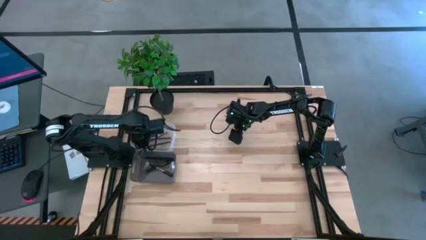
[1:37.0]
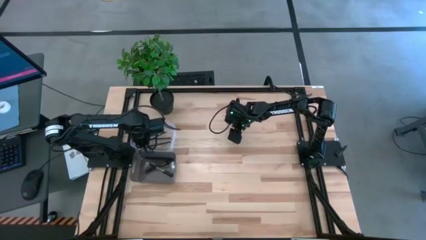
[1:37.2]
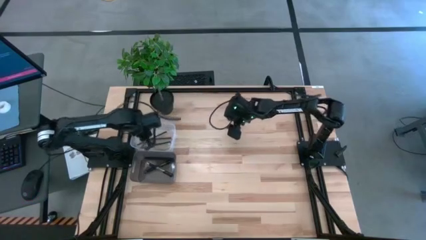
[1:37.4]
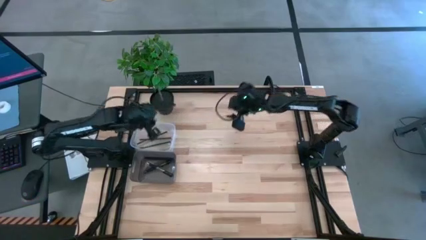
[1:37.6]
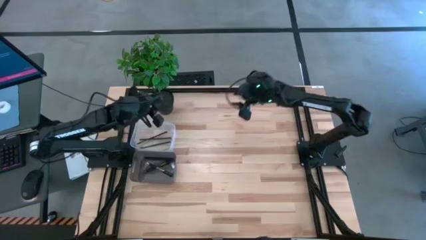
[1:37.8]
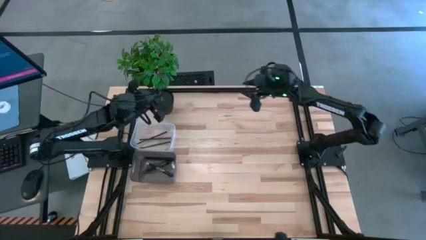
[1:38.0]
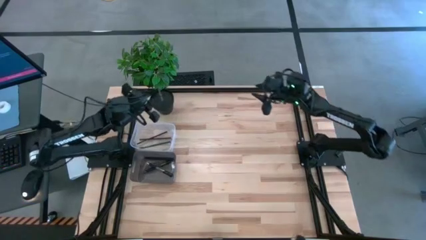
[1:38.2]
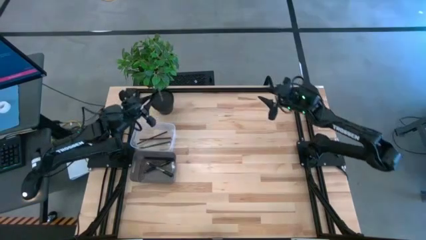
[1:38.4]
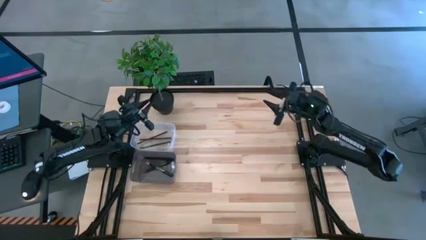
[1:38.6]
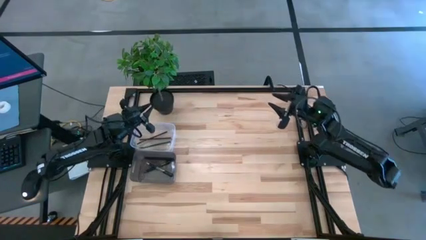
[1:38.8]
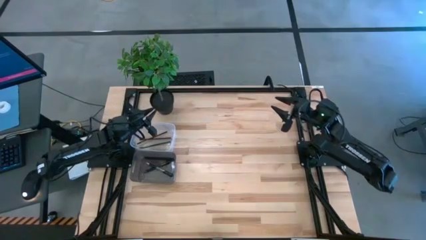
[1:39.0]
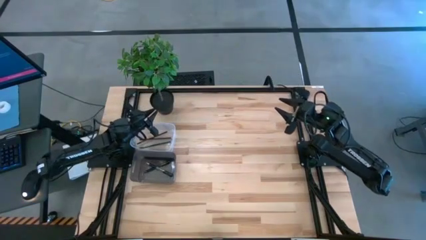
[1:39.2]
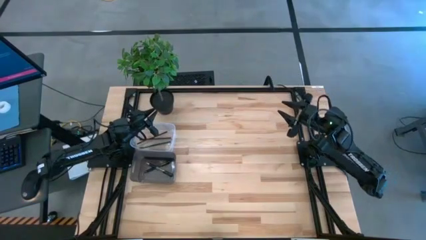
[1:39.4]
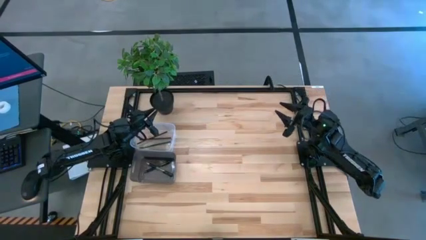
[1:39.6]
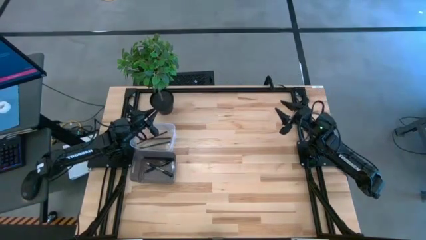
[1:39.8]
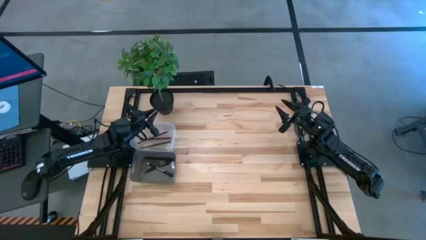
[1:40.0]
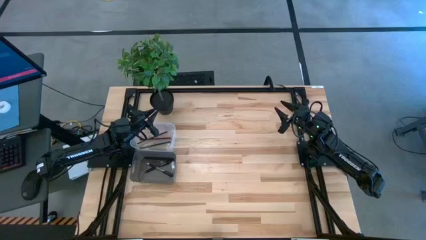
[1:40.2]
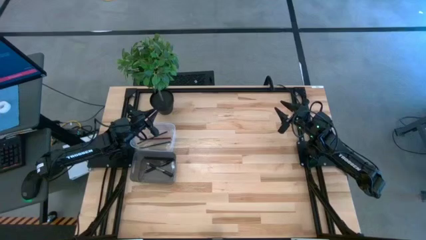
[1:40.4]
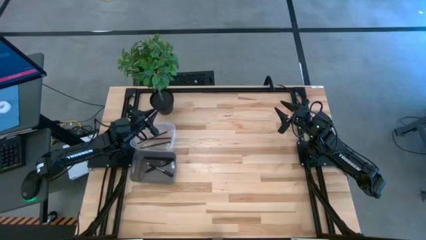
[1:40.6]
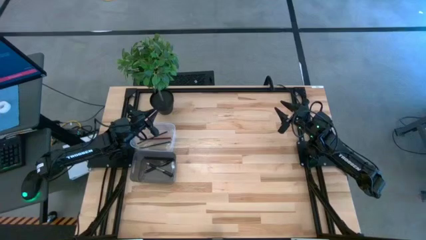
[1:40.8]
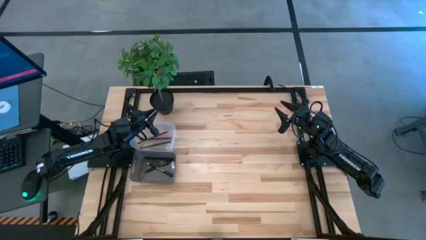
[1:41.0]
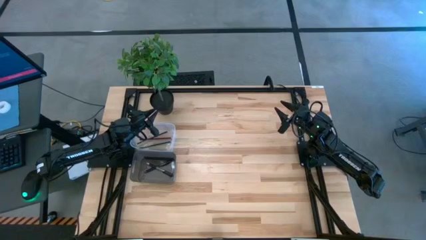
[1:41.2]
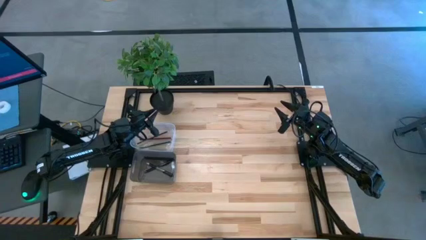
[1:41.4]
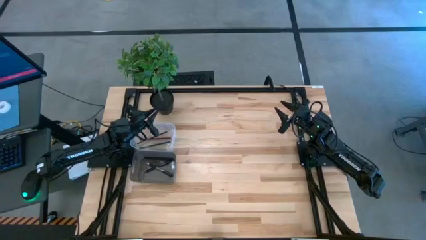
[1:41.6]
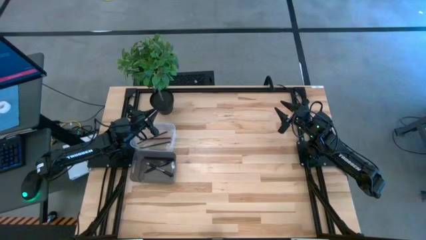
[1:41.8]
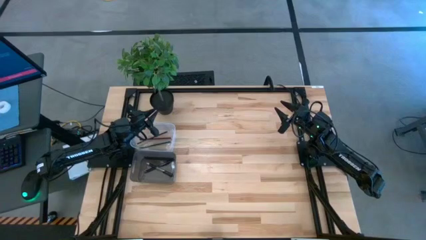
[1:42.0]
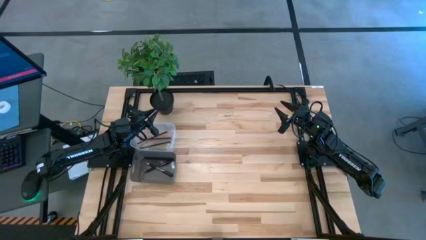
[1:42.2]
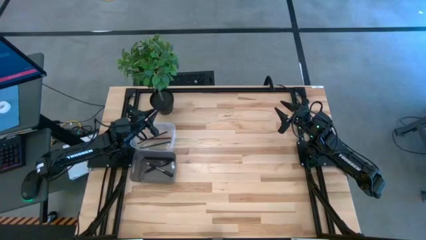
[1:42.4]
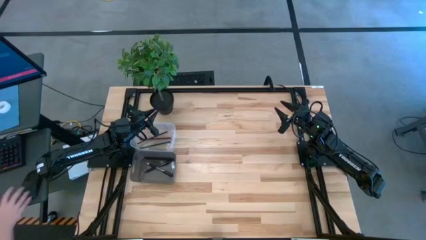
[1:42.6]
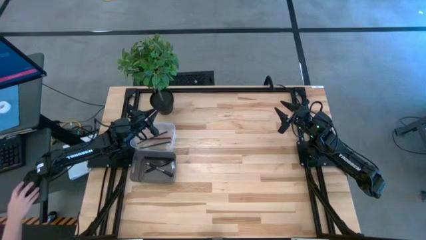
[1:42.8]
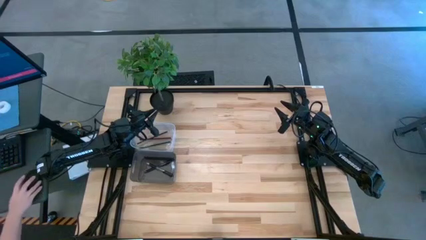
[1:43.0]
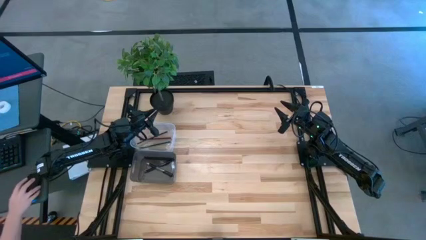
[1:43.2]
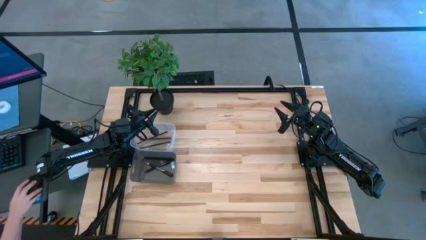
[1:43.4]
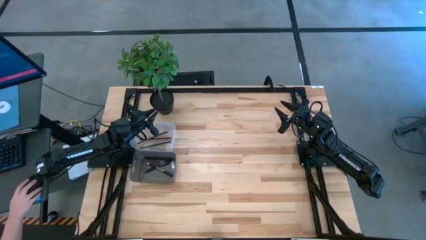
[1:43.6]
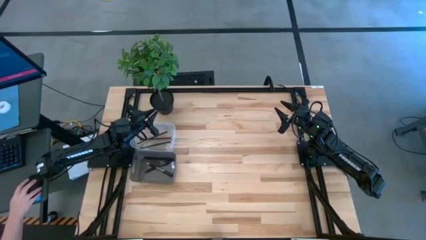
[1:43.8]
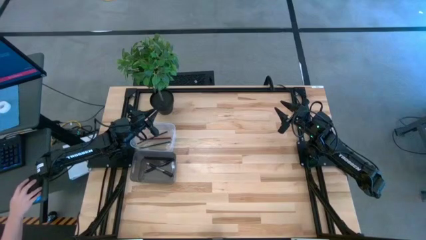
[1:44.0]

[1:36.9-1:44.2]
Task: Sort pens & pencils
Return to Home Position

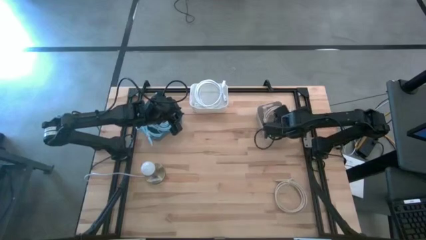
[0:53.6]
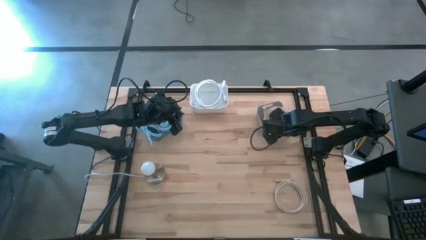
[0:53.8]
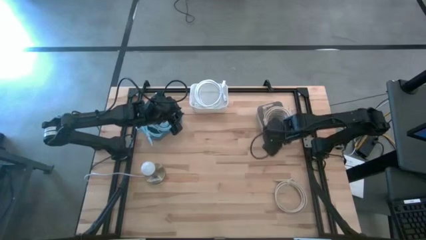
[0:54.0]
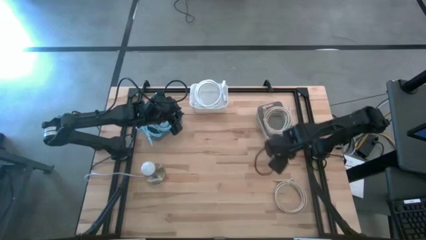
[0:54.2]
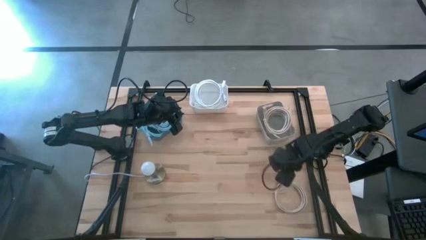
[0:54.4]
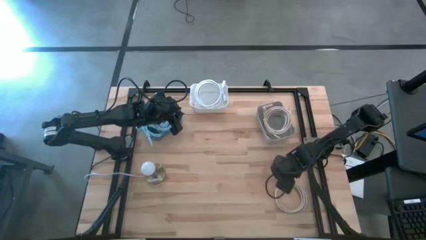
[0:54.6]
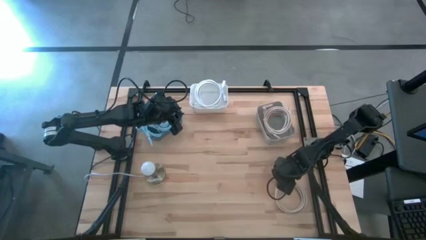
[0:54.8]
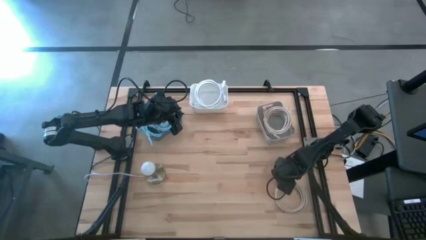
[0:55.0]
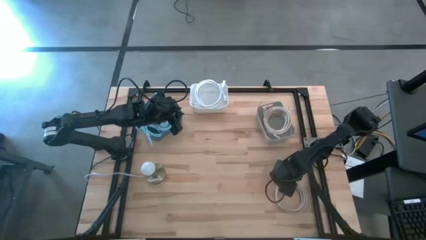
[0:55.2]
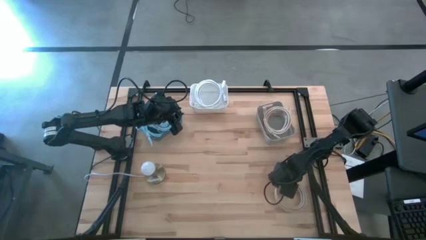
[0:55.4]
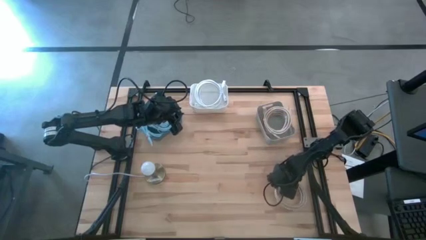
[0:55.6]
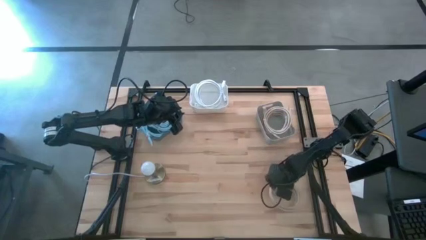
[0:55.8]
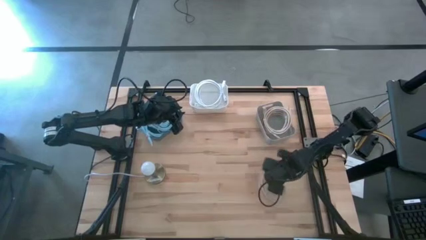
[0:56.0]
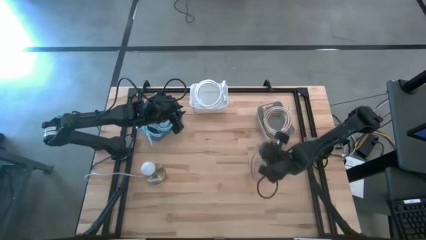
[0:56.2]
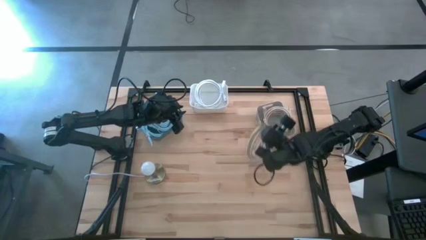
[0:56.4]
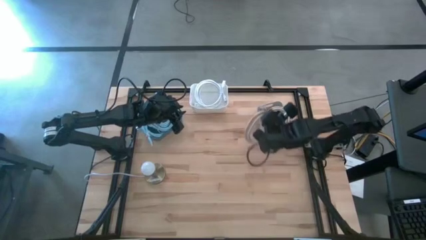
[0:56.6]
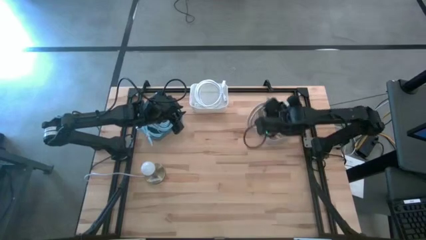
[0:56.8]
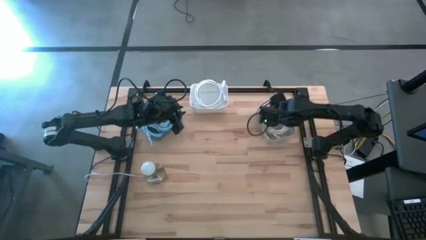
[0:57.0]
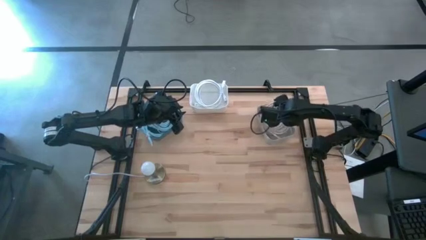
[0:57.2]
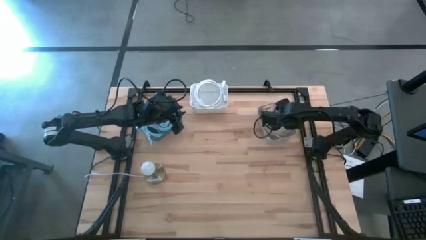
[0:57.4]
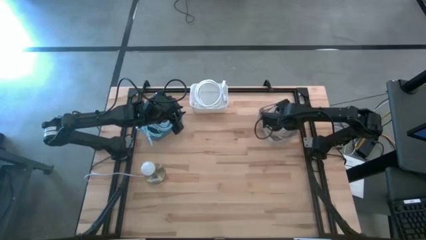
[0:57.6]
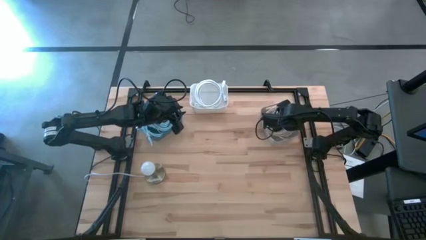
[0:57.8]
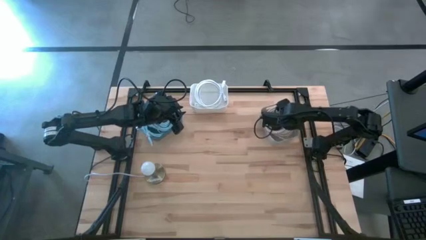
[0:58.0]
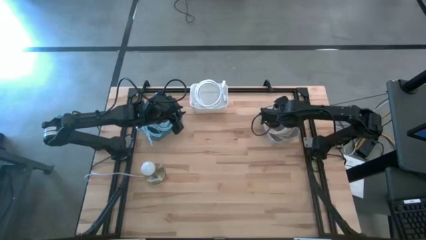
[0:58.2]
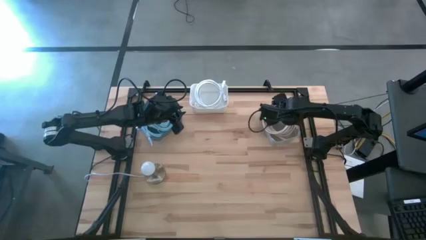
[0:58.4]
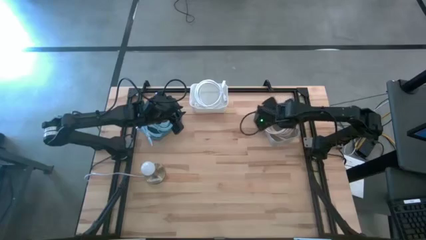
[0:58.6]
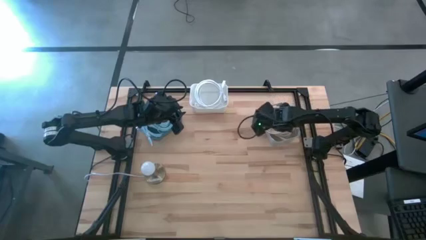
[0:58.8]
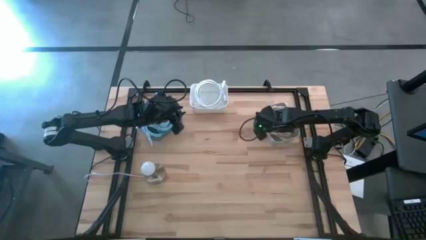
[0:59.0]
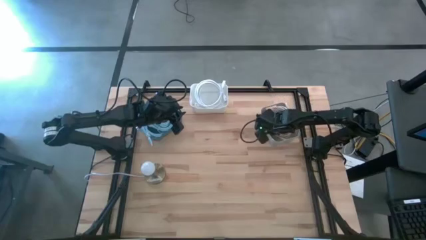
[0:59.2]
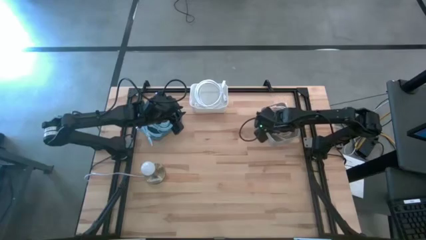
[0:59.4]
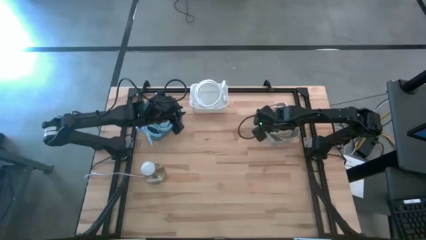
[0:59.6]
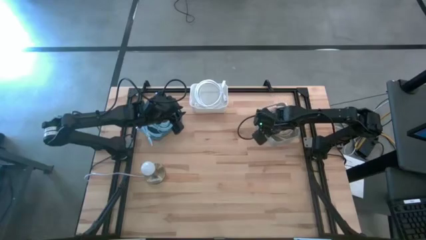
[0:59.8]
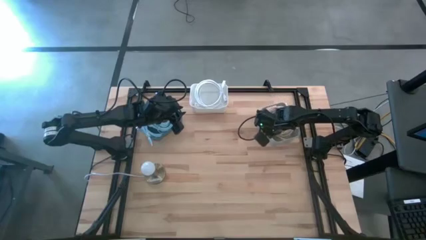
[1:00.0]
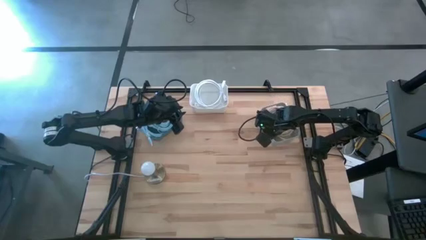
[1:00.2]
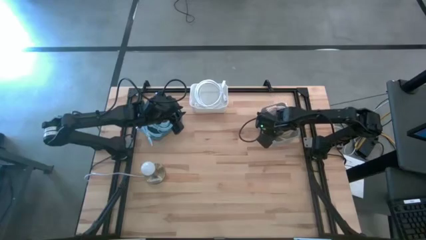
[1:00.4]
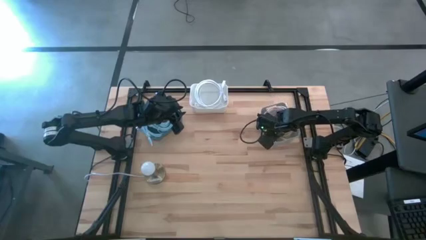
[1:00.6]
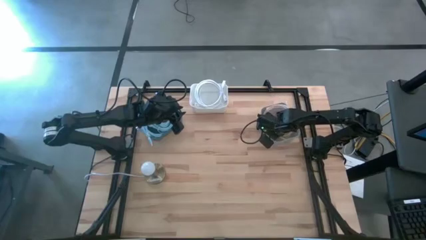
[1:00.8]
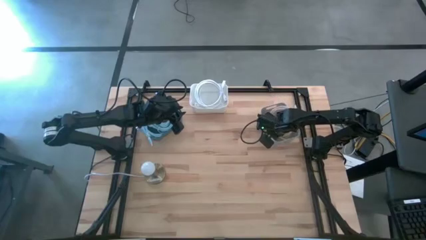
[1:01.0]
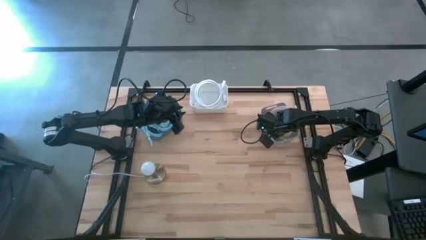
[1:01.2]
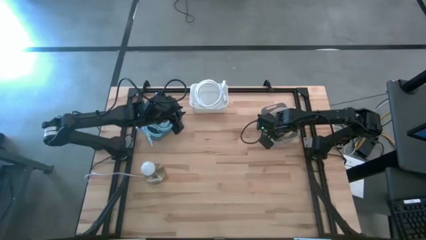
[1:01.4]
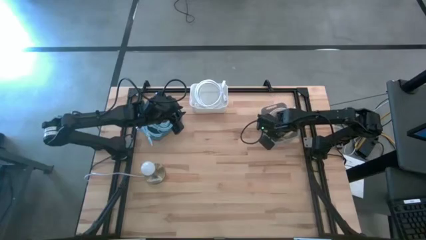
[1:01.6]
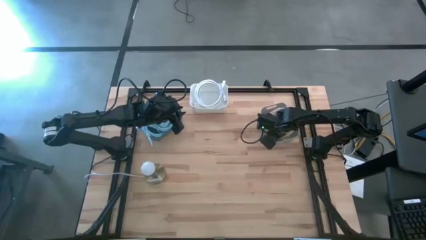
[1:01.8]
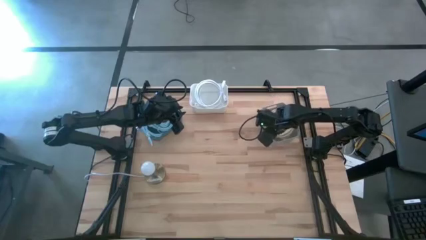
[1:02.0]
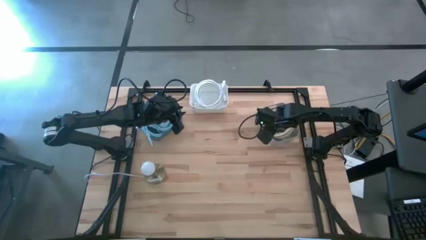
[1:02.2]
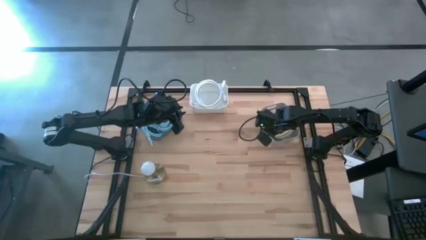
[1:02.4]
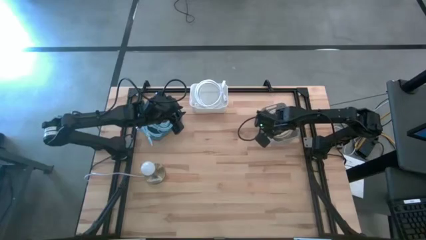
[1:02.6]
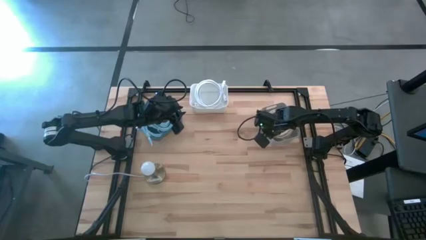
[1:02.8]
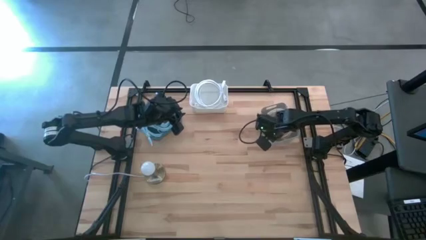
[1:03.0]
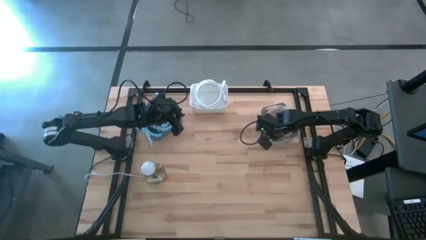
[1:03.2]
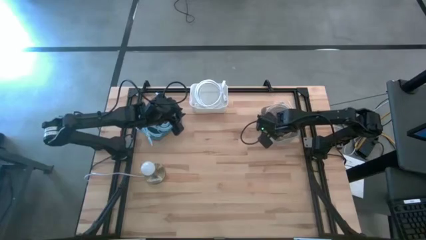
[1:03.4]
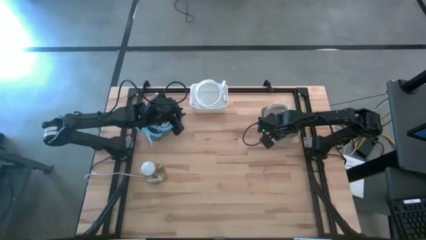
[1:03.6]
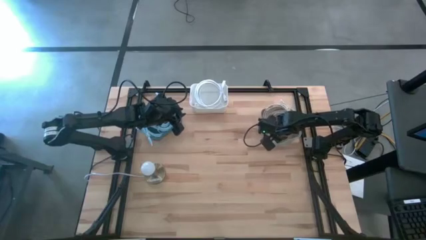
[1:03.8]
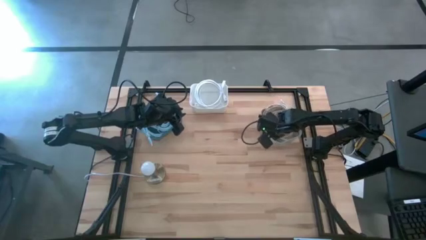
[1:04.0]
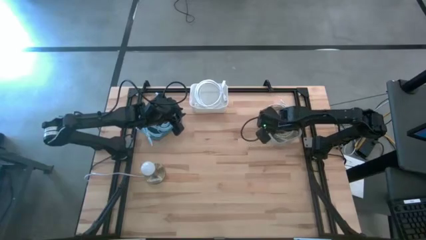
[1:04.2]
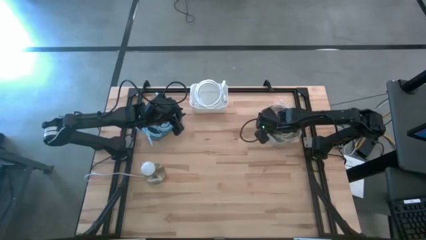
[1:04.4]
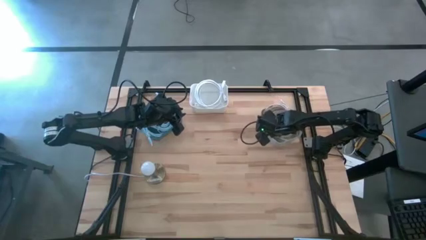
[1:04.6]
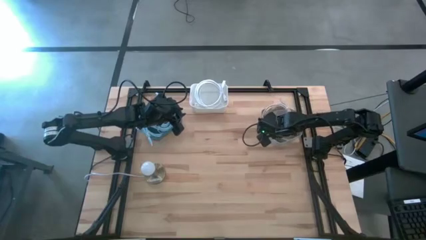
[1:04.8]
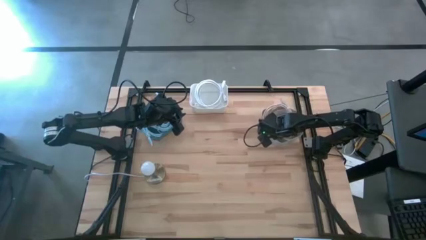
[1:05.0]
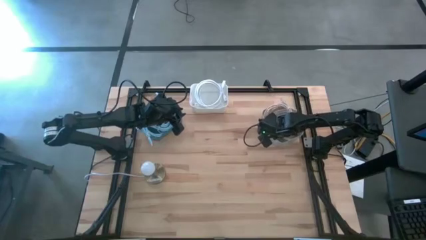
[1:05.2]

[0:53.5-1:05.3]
Task: Sort HDMI cables
Put the brown hdmi cable into the gray bin
